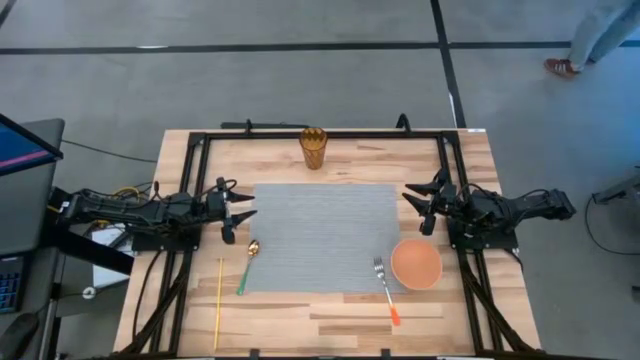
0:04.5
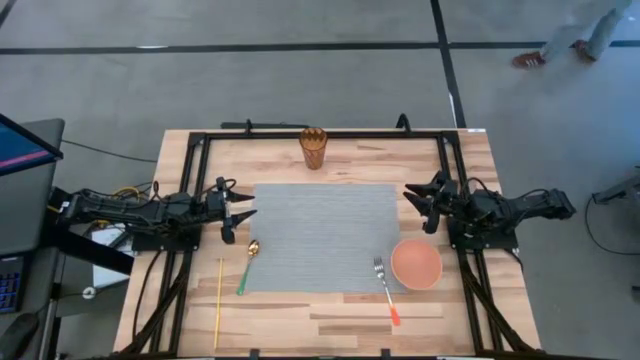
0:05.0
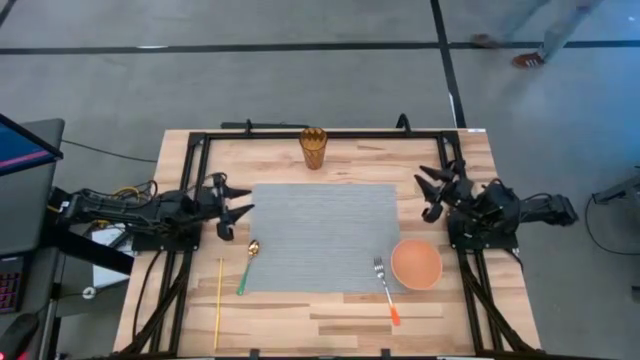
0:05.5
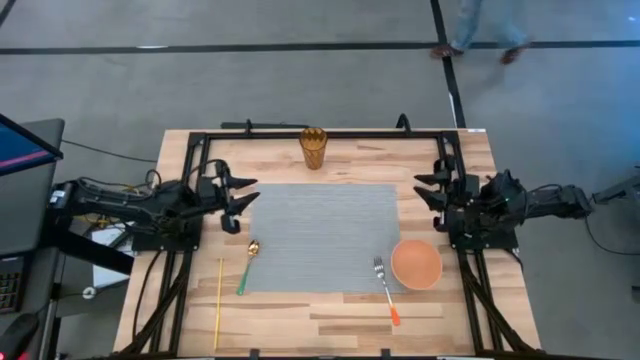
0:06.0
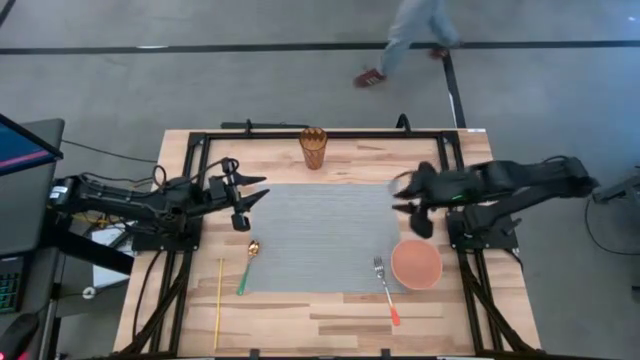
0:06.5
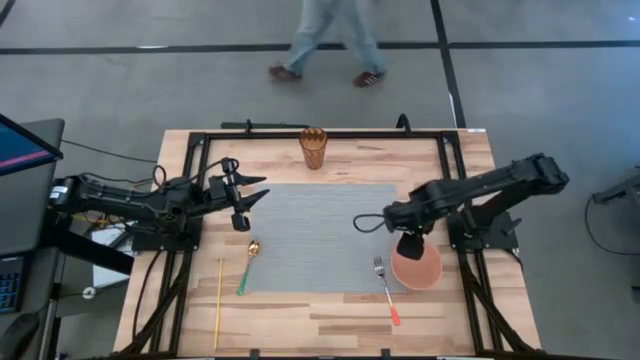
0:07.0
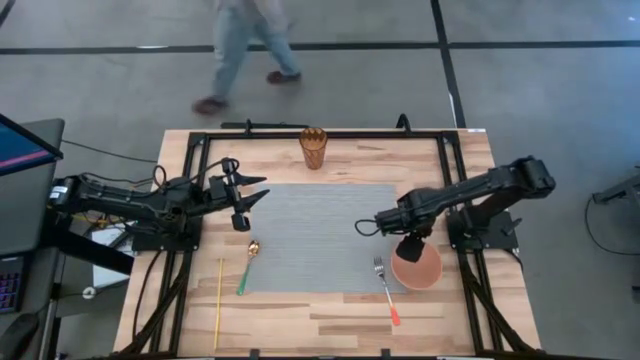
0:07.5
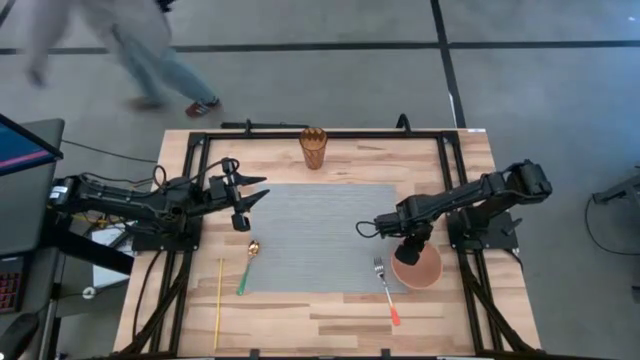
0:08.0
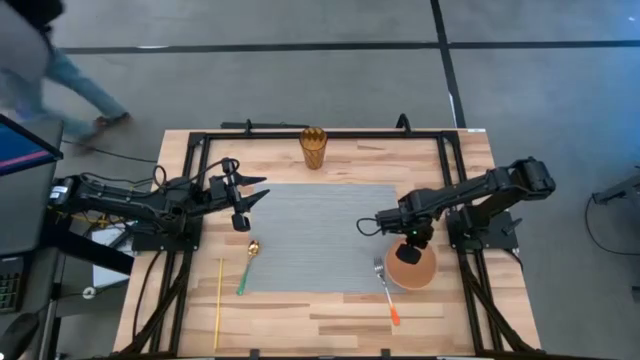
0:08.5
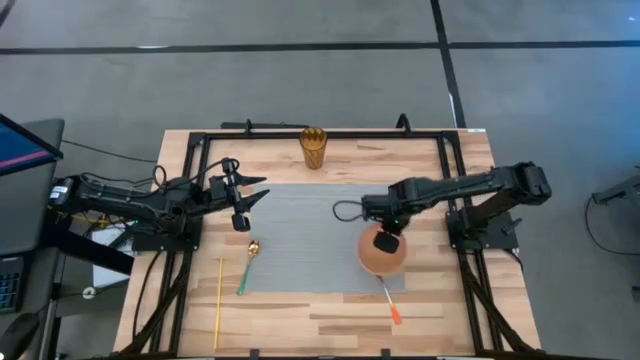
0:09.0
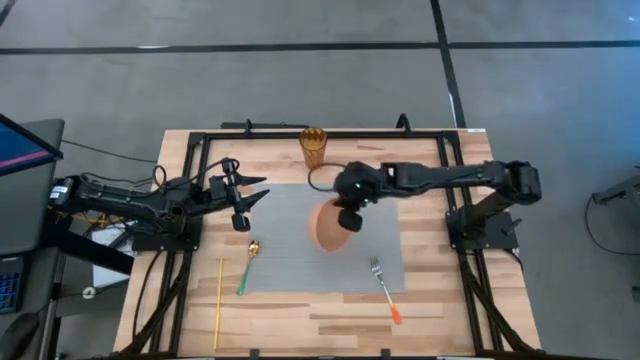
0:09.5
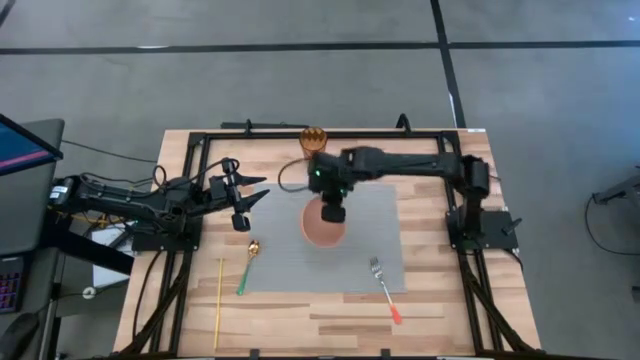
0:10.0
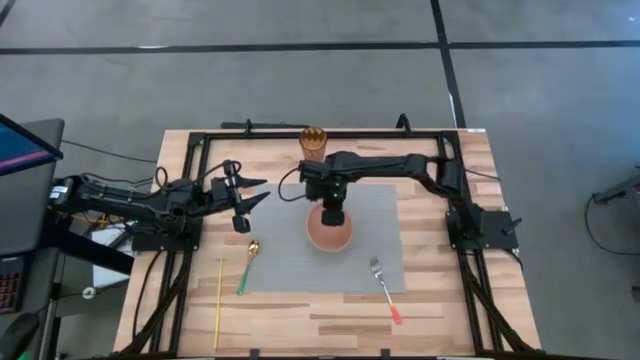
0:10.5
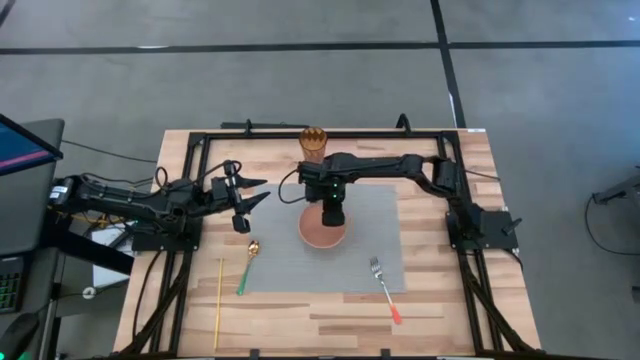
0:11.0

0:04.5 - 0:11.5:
Task: Pick & Place Utensil
Put the orange bowl on the gray mat

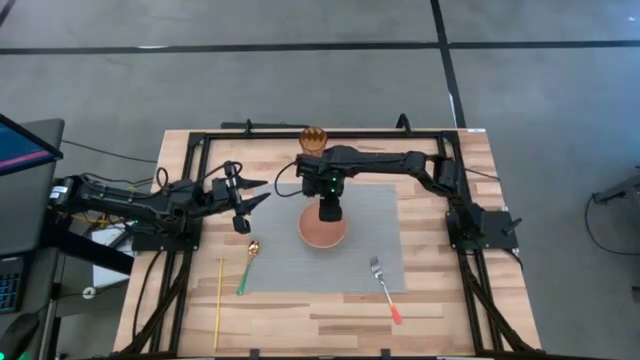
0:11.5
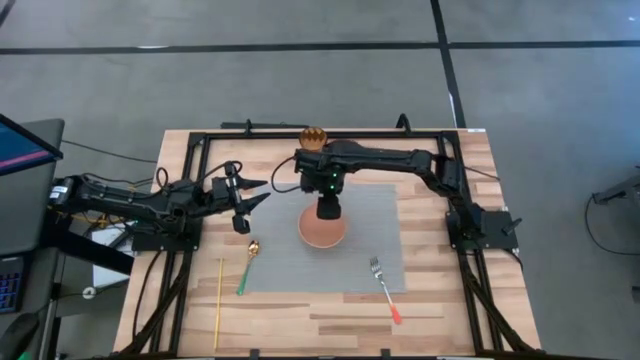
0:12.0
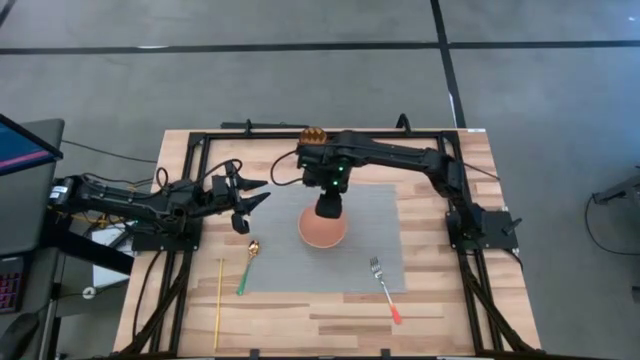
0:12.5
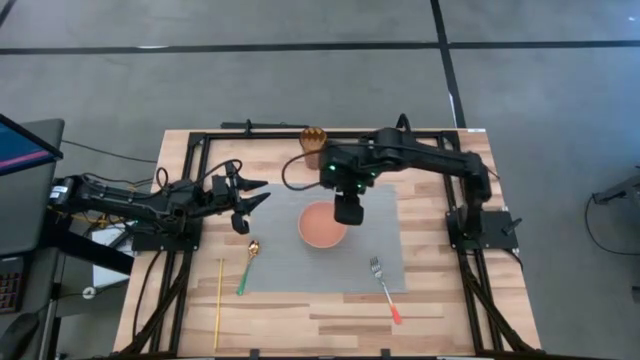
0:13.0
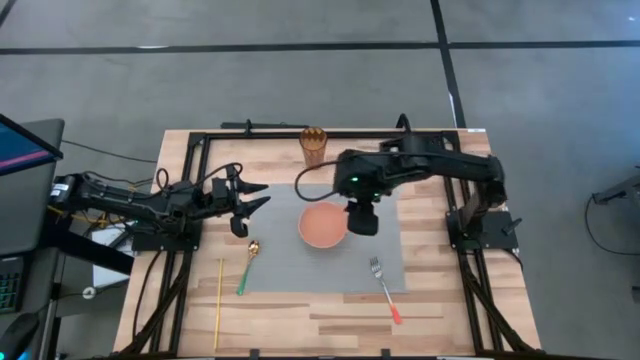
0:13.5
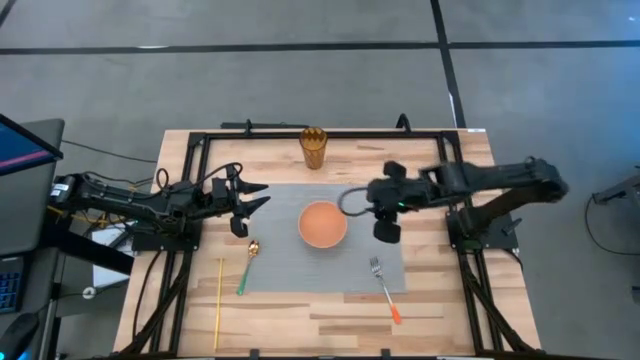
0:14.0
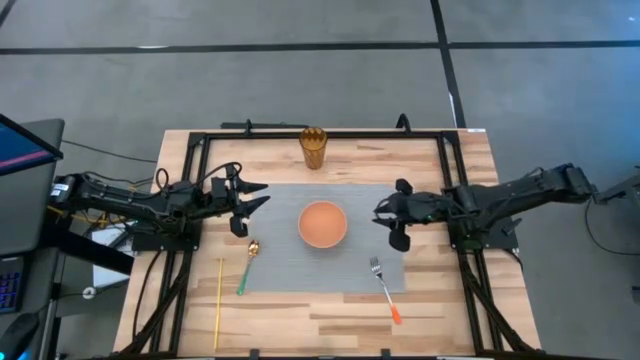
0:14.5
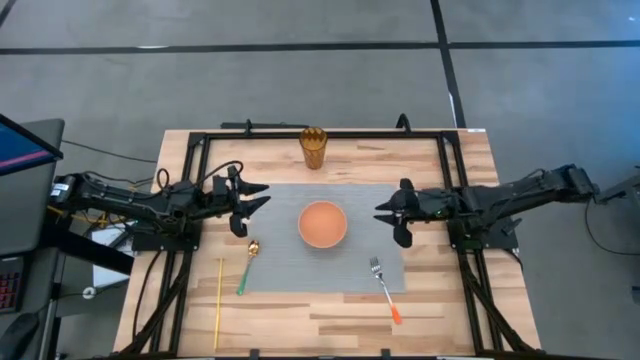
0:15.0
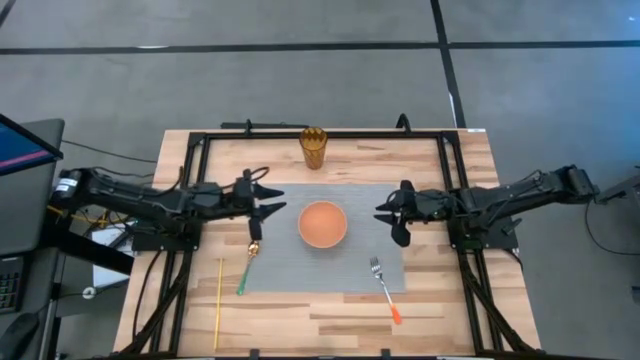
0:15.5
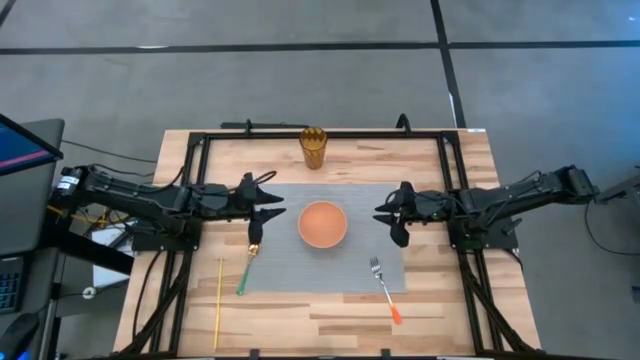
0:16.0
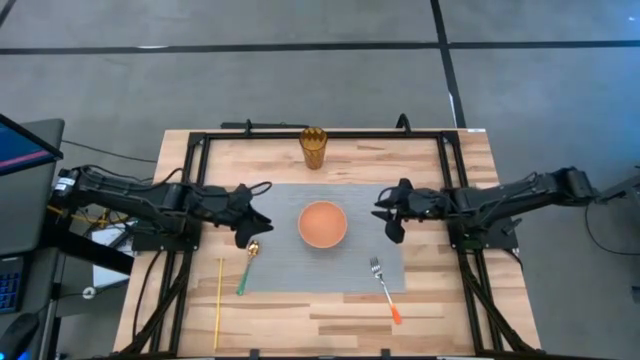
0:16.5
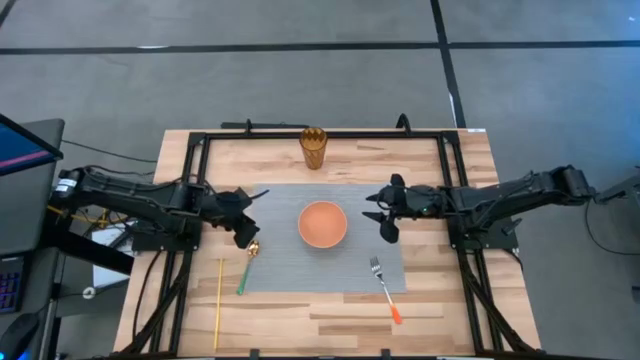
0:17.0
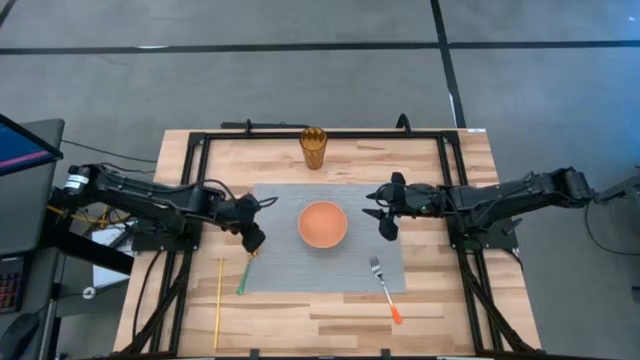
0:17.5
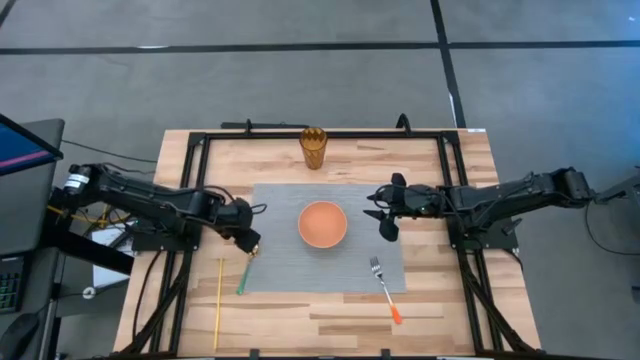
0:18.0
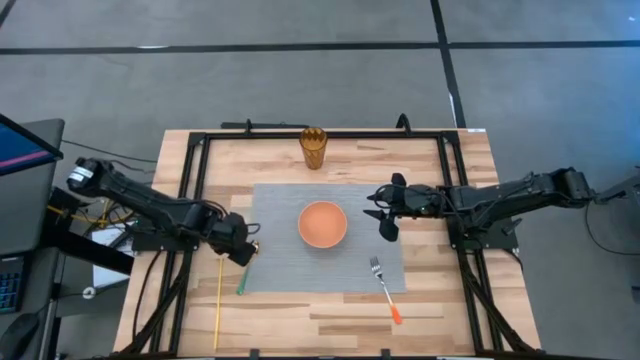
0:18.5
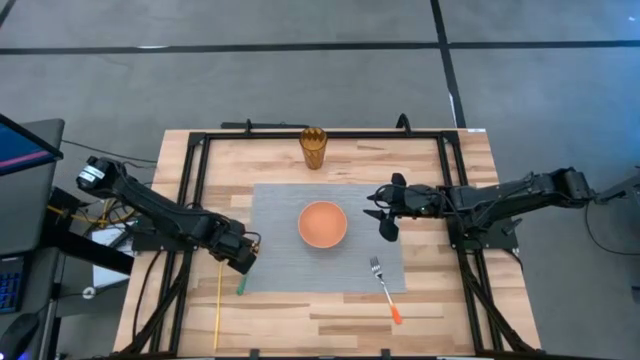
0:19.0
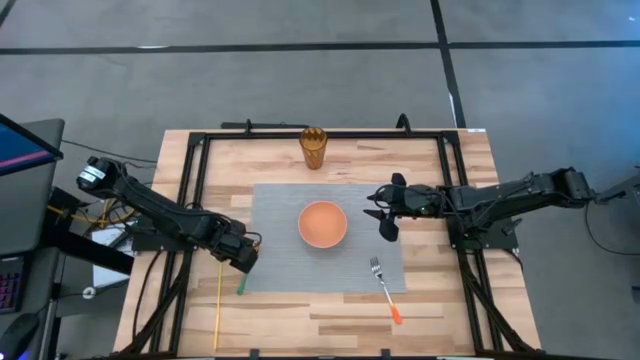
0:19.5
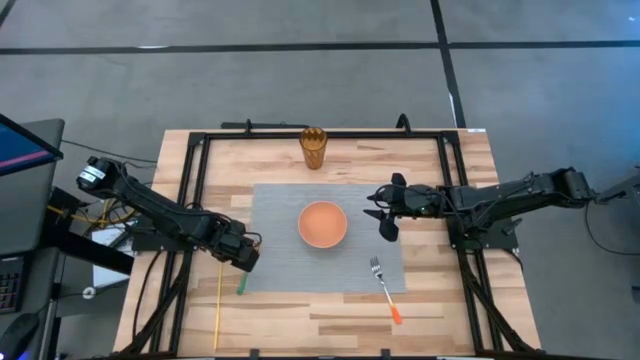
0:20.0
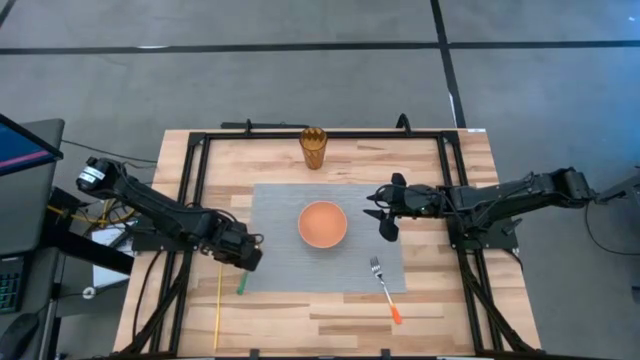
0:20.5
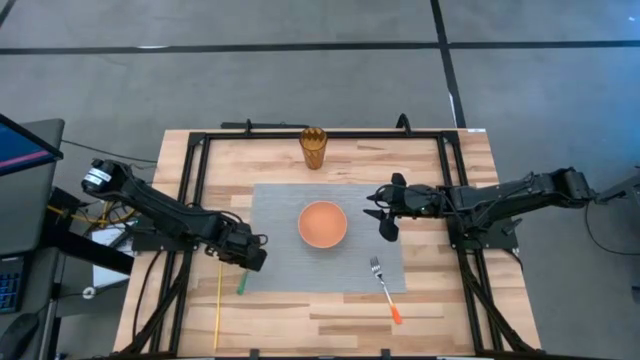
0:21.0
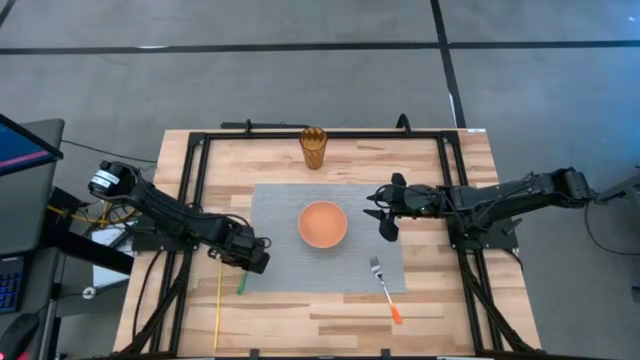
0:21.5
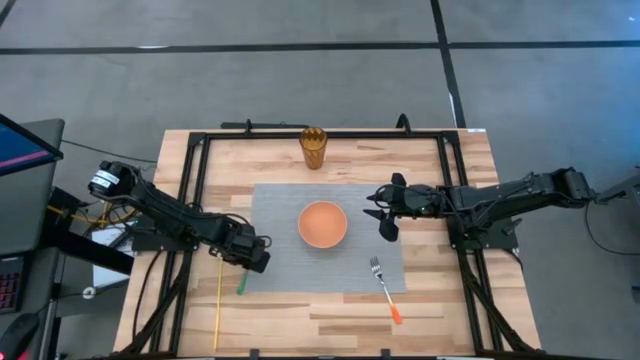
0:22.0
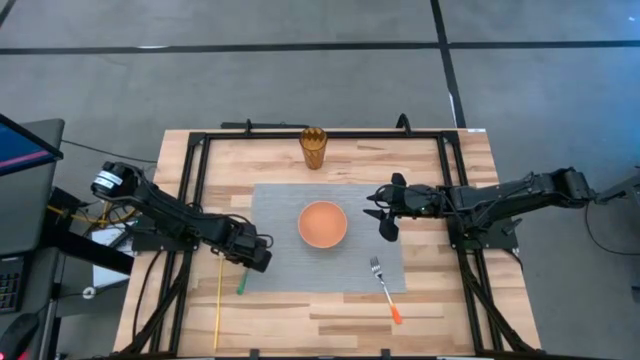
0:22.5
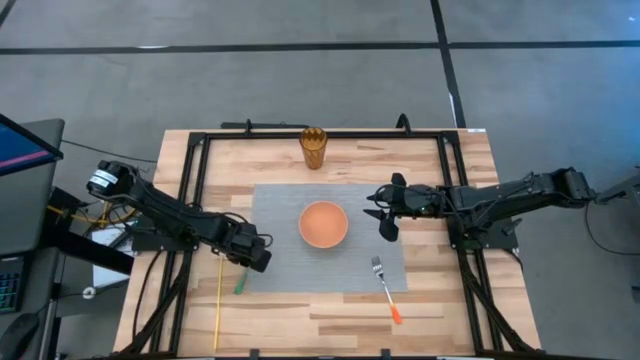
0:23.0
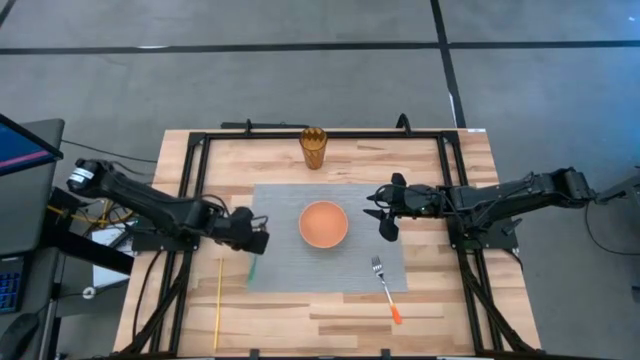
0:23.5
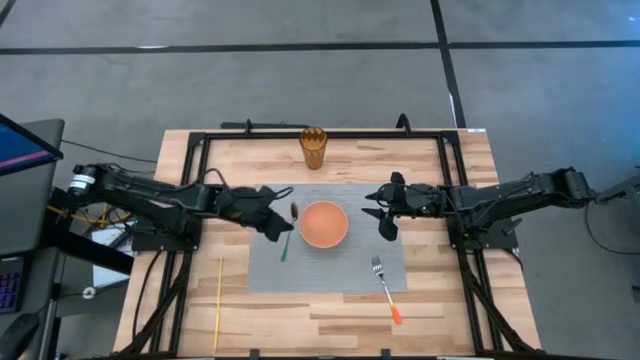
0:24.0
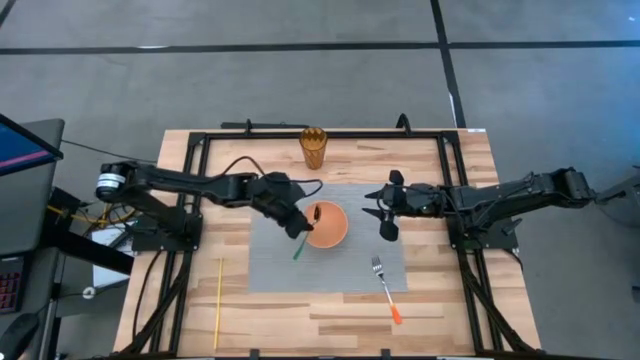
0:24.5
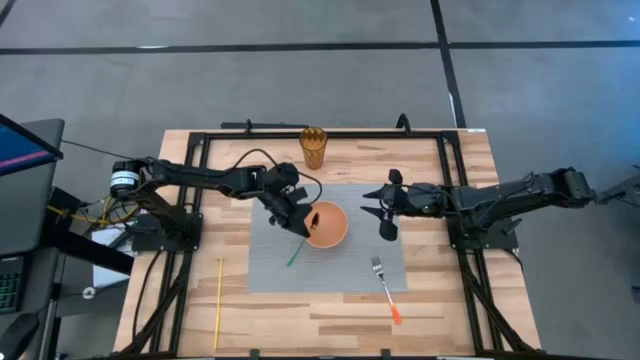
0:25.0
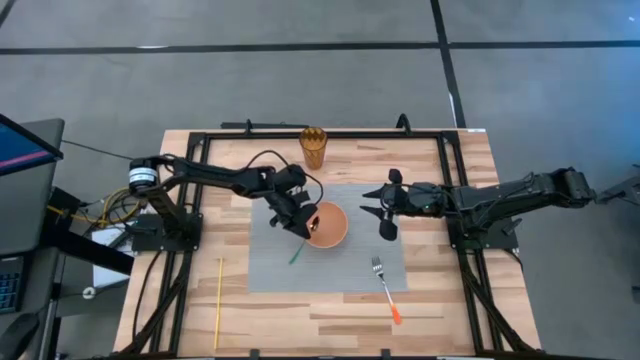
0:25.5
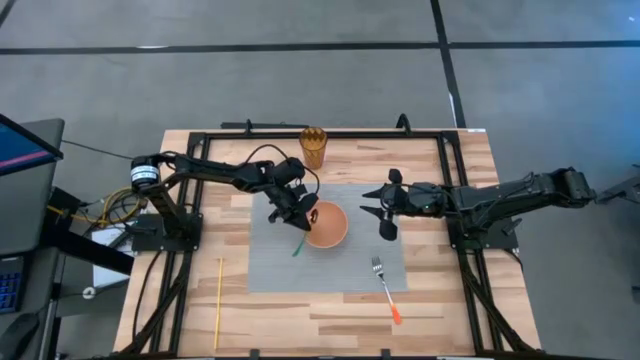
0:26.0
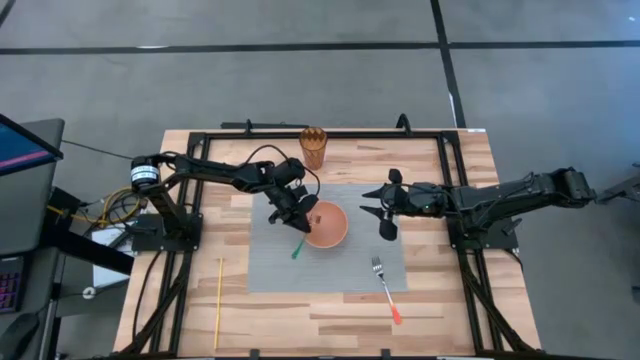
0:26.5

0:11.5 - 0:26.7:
Put the green spoon into the orange bowl on the gray mat
